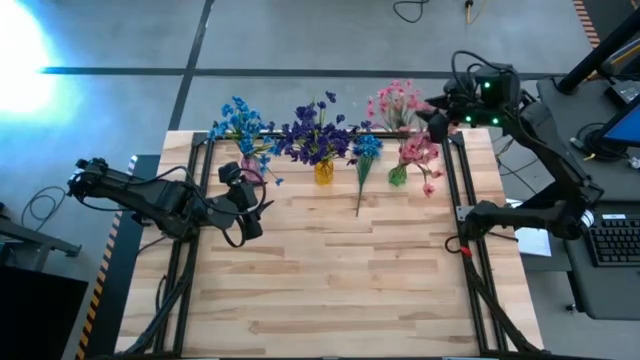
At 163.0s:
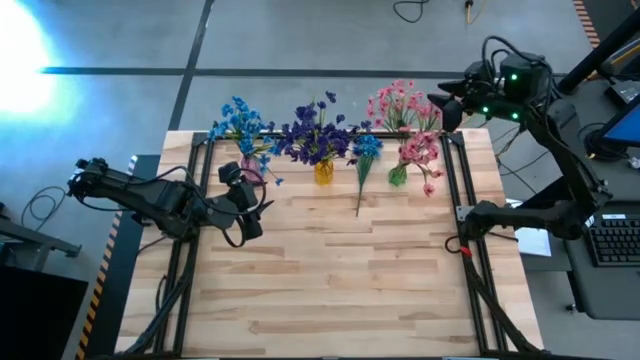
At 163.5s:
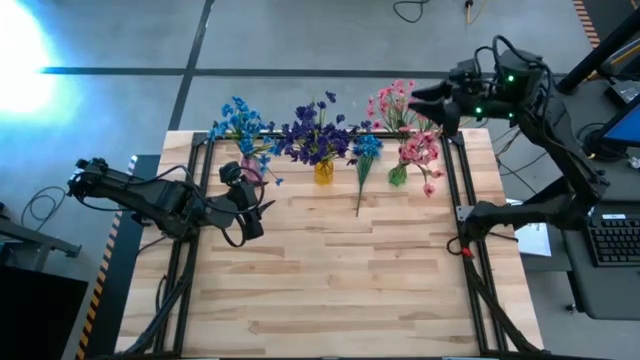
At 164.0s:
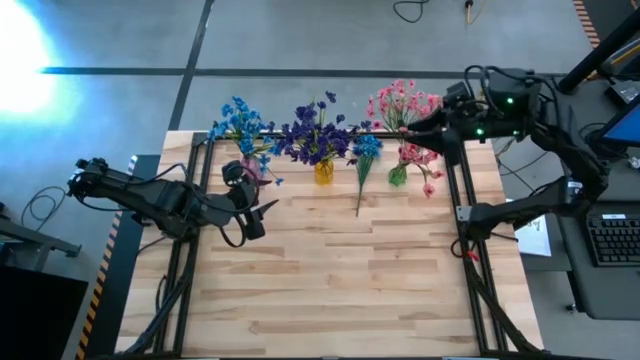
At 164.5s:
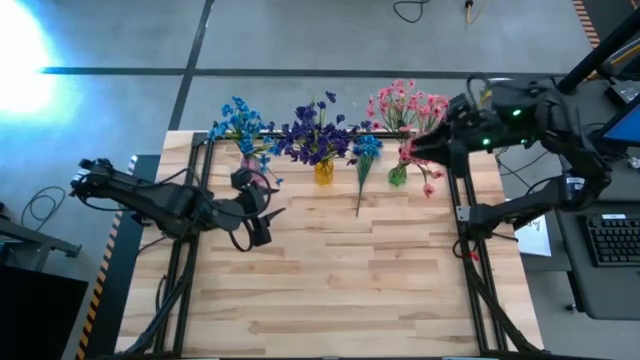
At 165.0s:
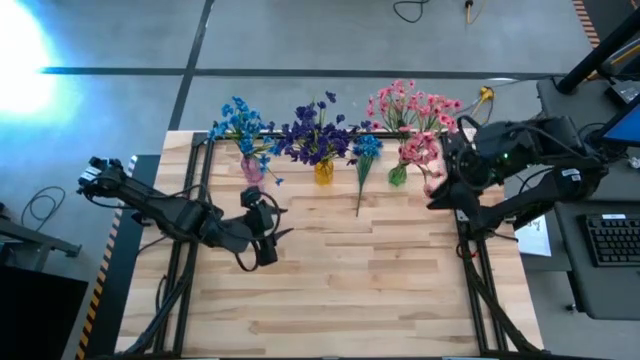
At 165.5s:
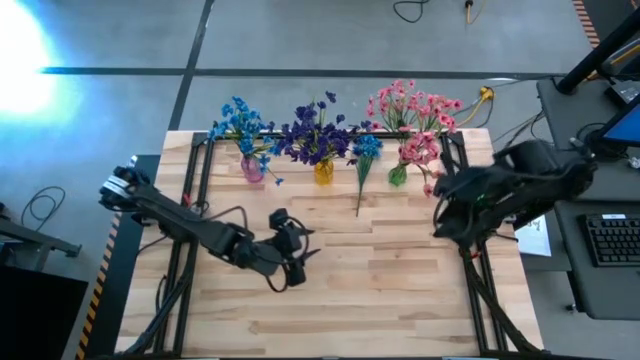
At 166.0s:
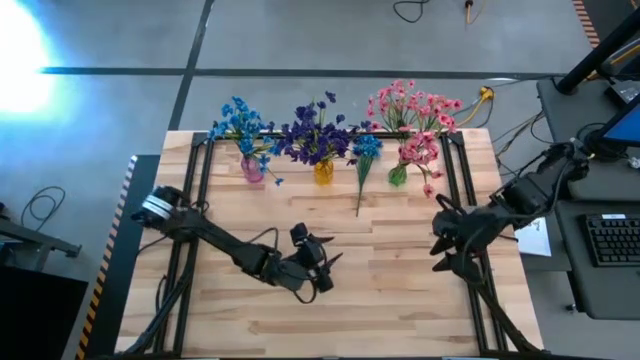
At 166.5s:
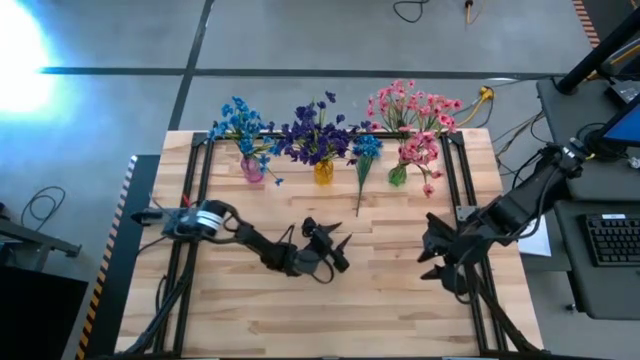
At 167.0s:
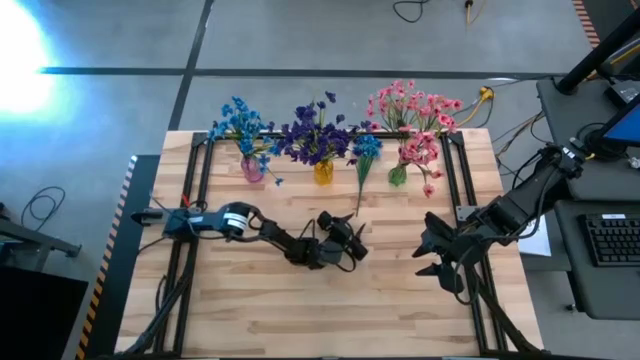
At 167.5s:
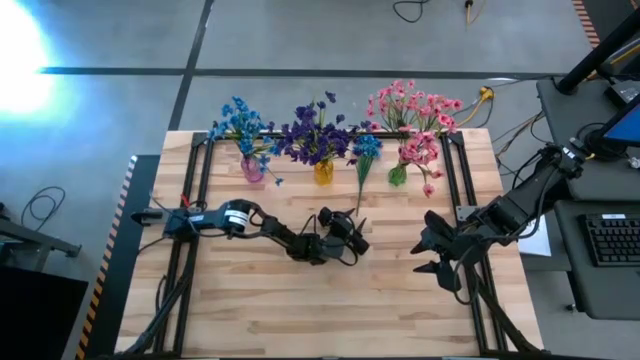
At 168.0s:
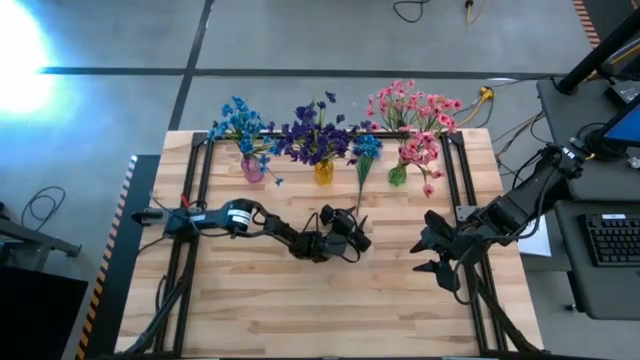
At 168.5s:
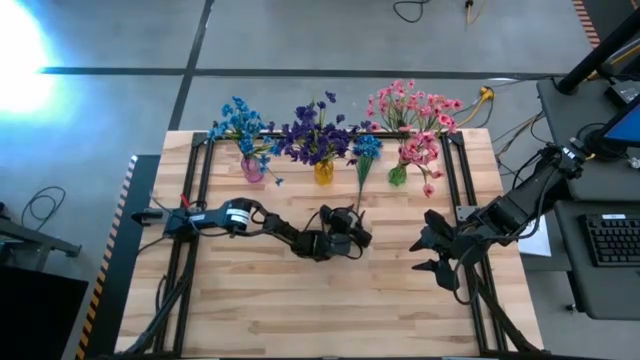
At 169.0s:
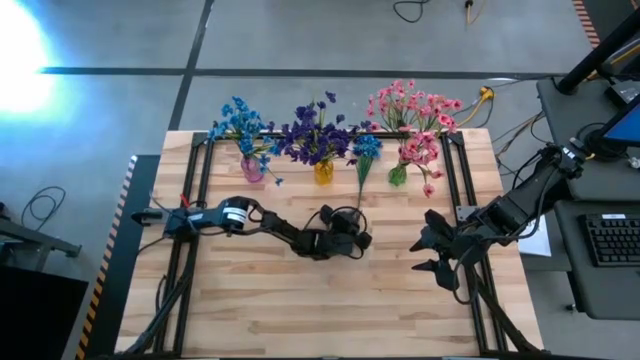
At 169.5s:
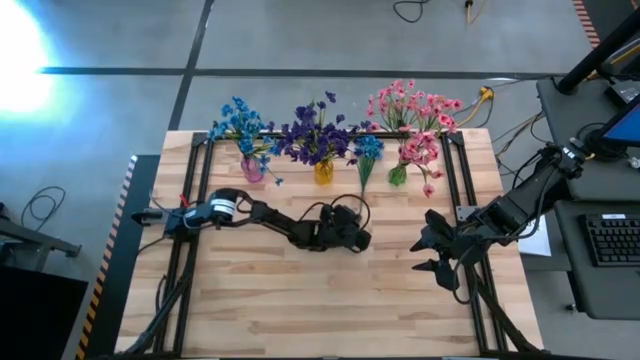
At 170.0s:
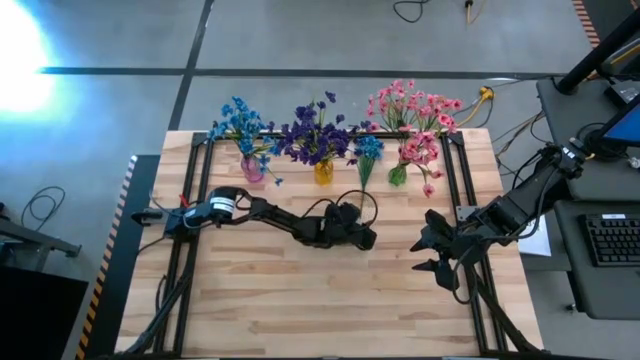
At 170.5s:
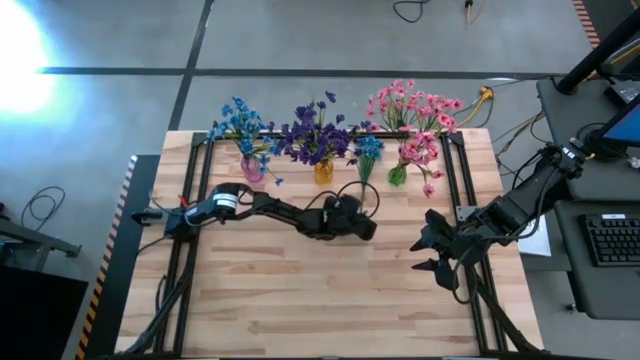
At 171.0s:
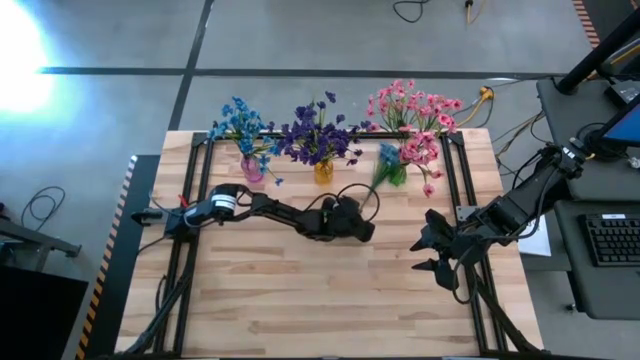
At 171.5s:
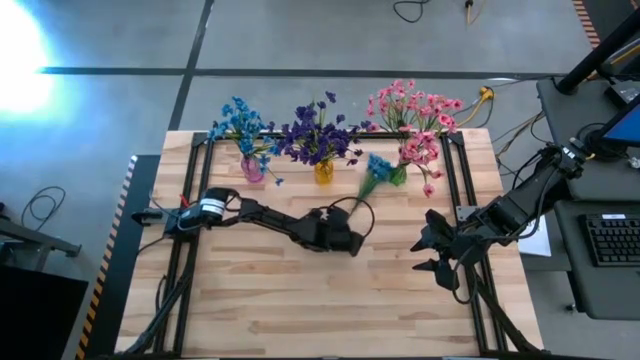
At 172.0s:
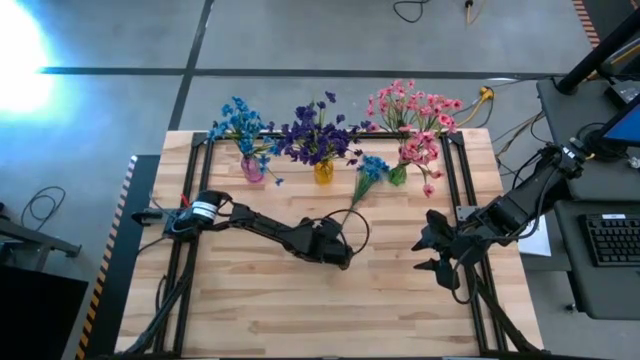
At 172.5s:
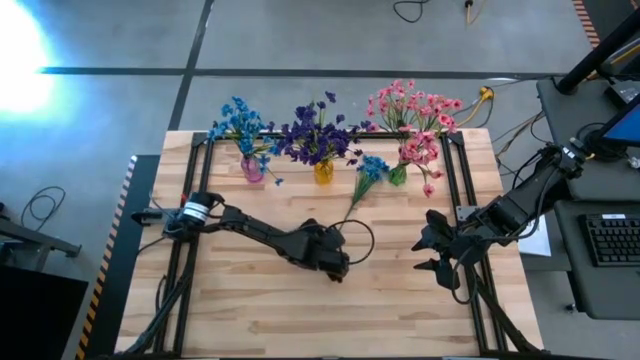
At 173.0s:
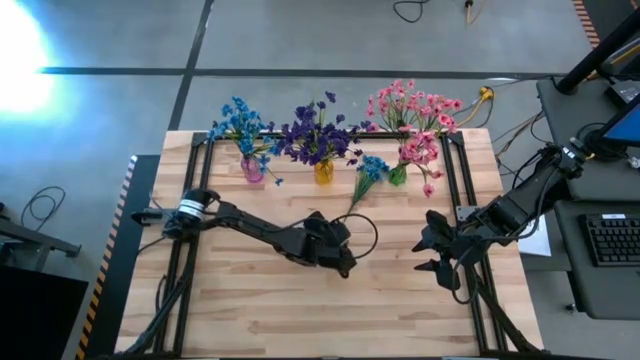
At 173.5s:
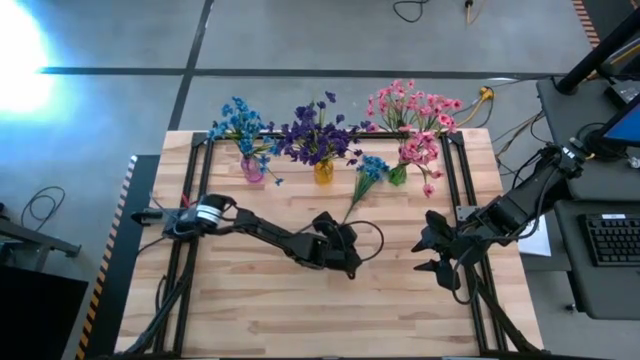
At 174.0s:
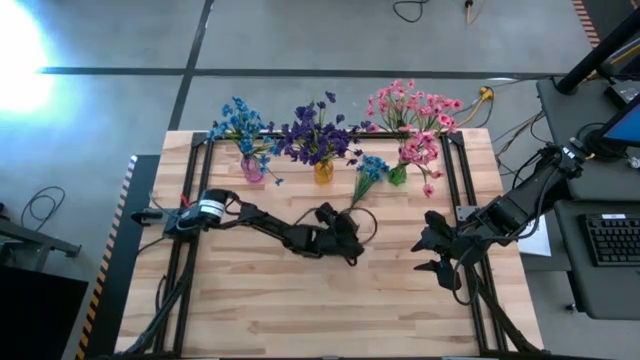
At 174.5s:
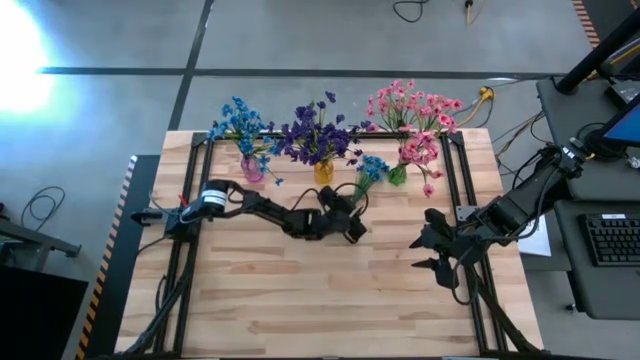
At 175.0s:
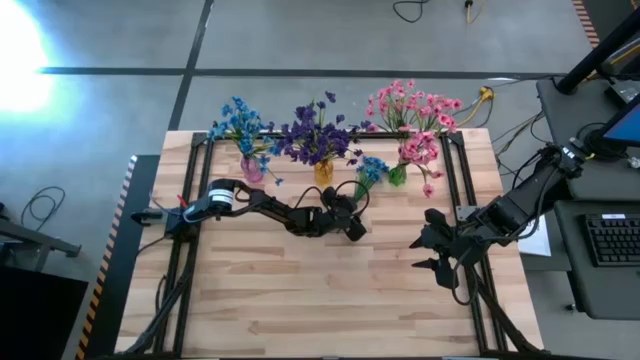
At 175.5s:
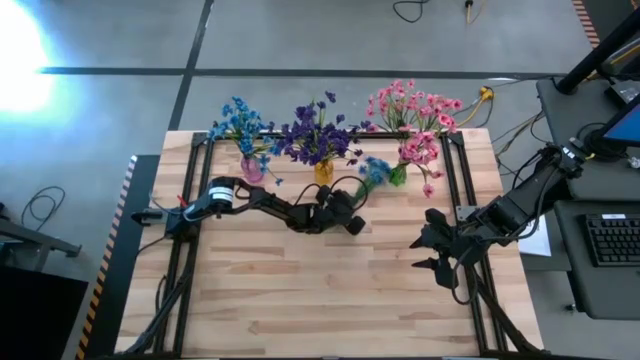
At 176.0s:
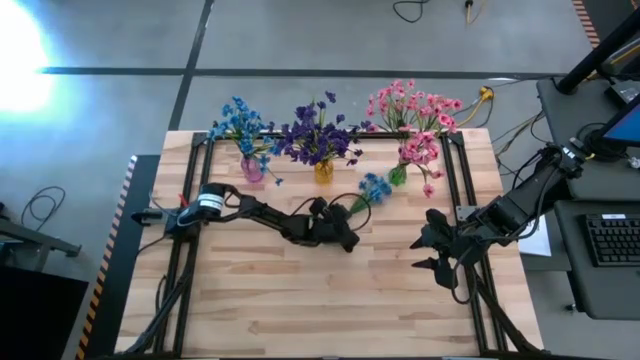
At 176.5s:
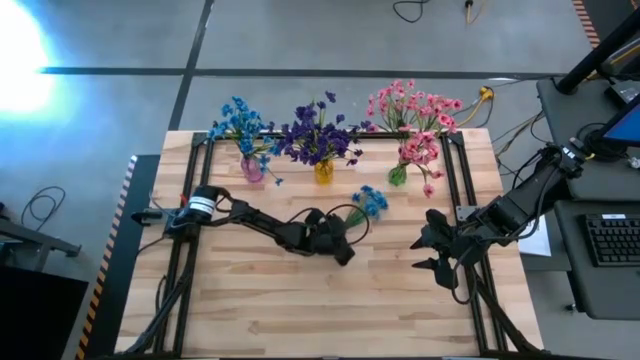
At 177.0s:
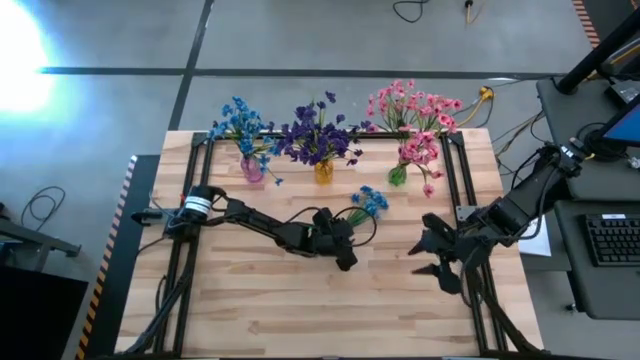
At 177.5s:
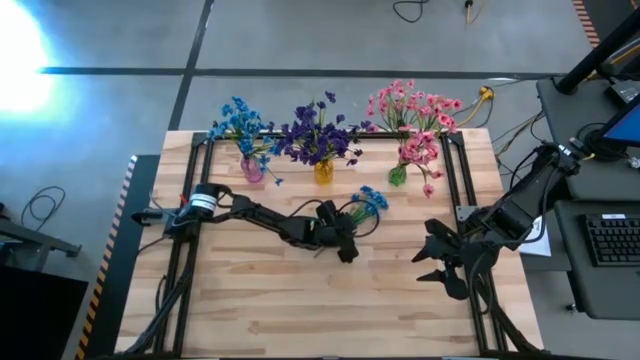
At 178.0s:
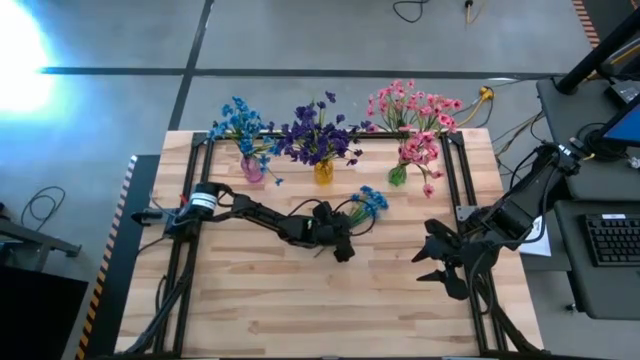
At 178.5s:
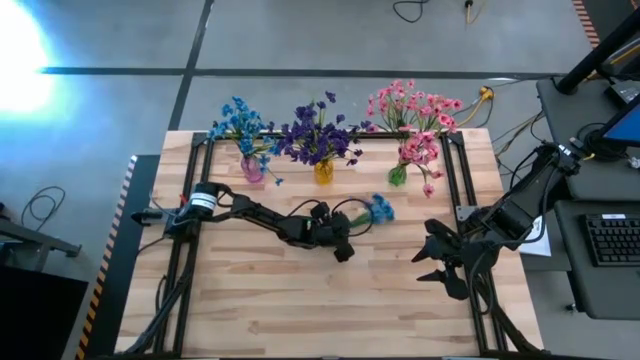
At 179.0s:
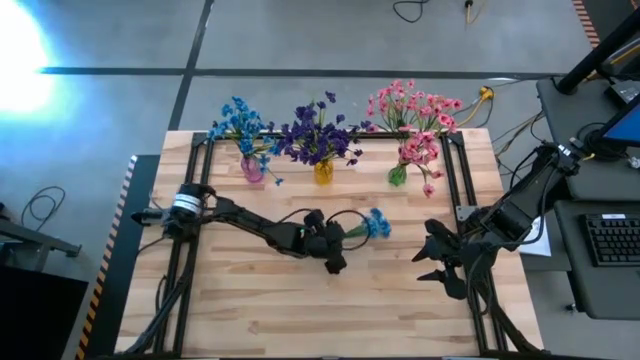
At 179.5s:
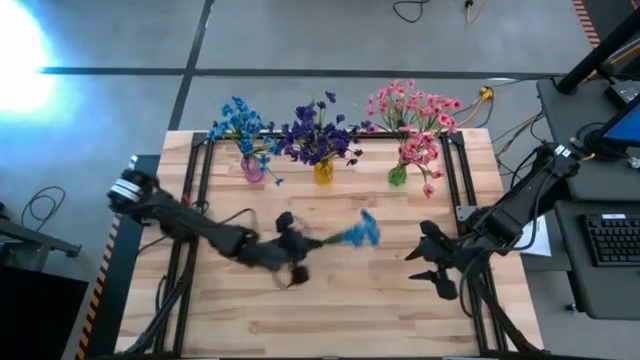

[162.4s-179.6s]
Task: Sort flowers into vase by color
Put the blue flowers into the violet vase

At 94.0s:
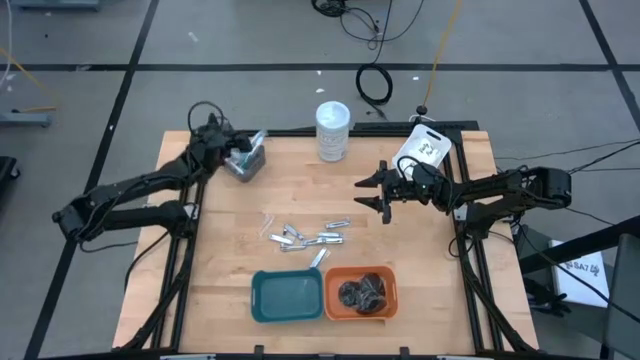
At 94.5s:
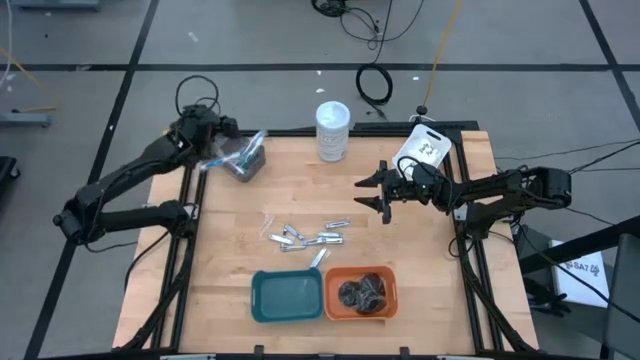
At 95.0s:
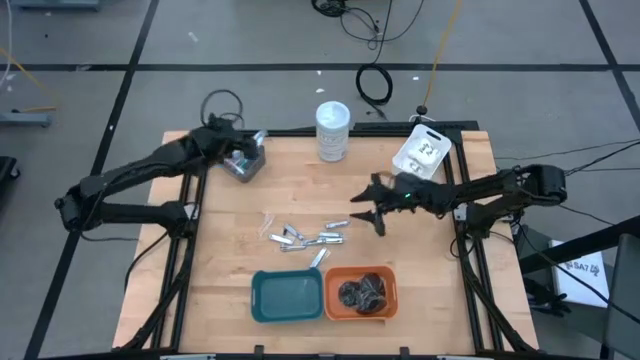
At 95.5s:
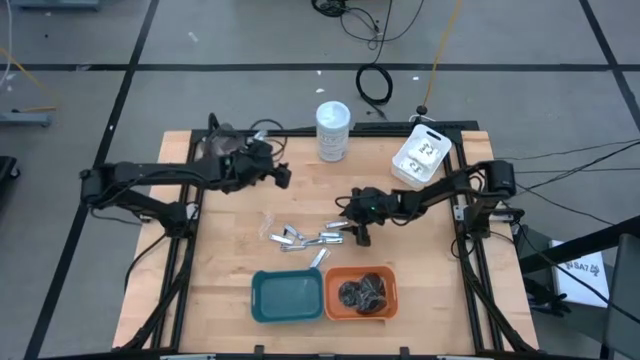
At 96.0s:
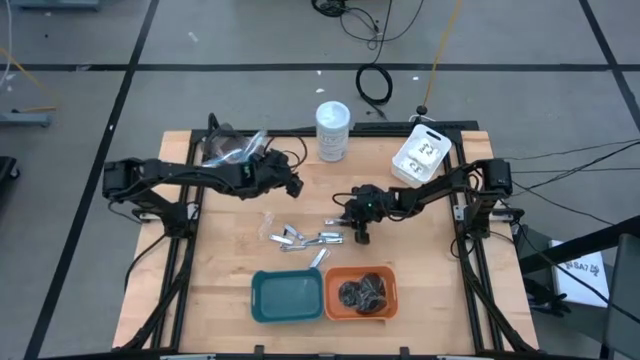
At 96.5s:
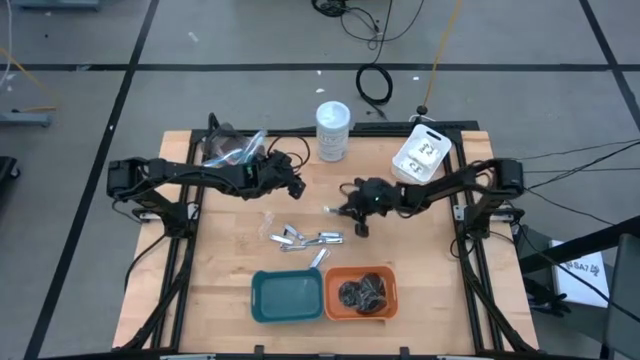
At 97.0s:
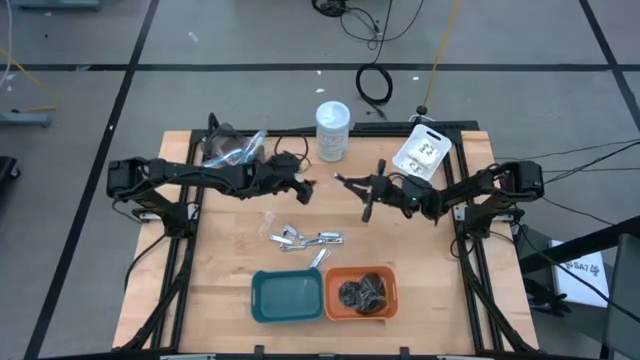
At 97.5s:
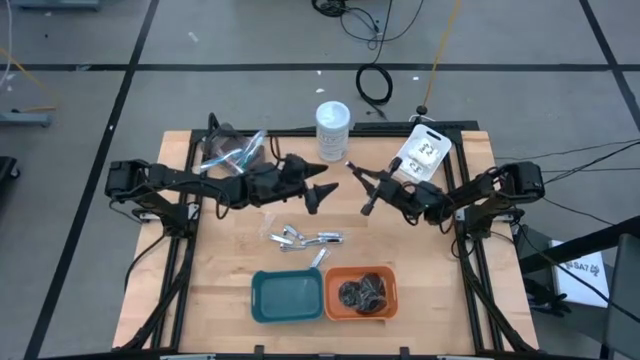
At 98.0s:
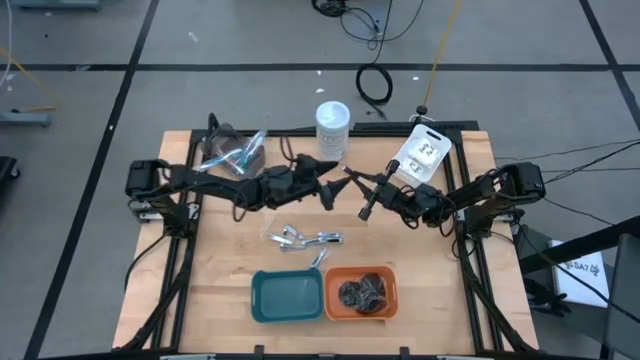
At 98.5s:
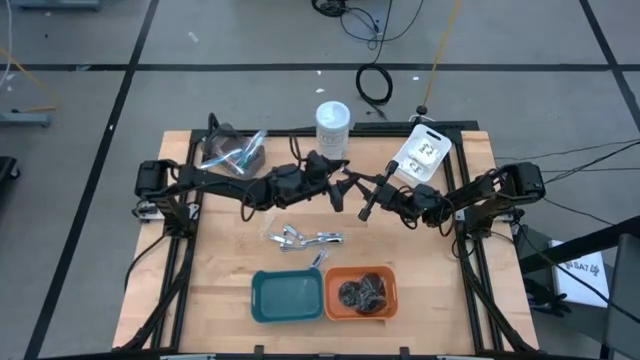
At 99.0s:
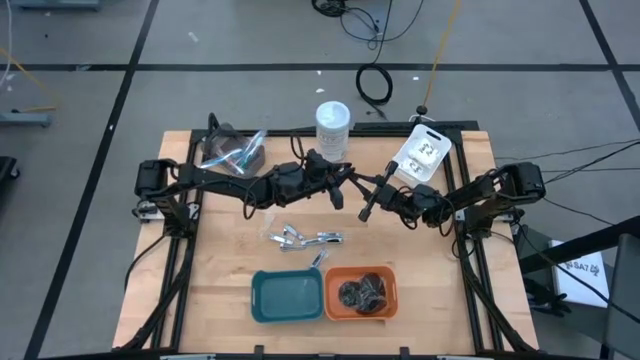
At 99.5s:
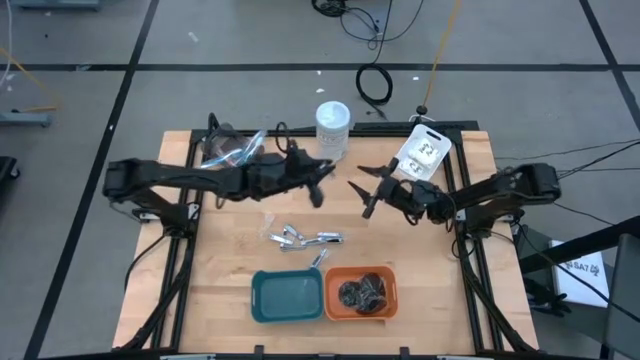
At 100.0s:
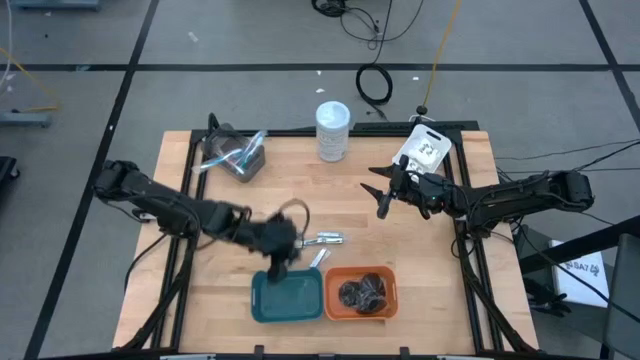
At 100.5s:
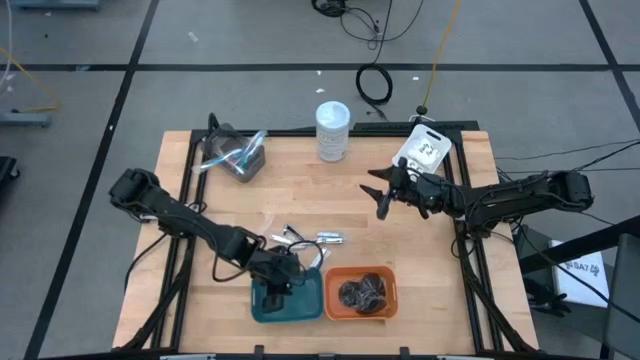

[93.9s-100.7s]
Task: Pick & Place Travel size toiletries
Put the silver nail cutter into the green bin
